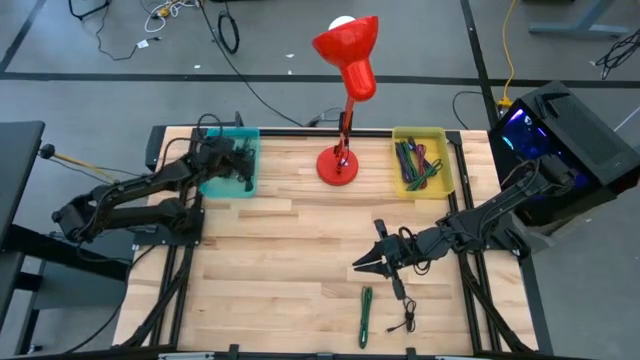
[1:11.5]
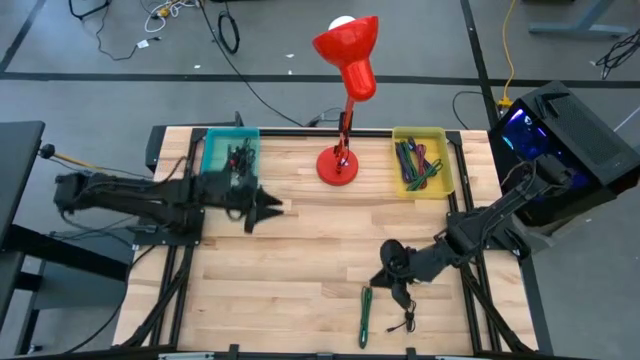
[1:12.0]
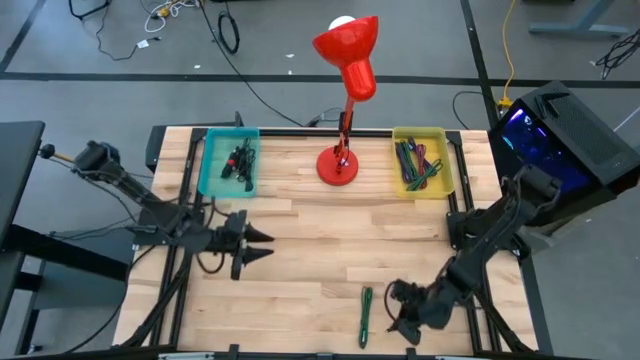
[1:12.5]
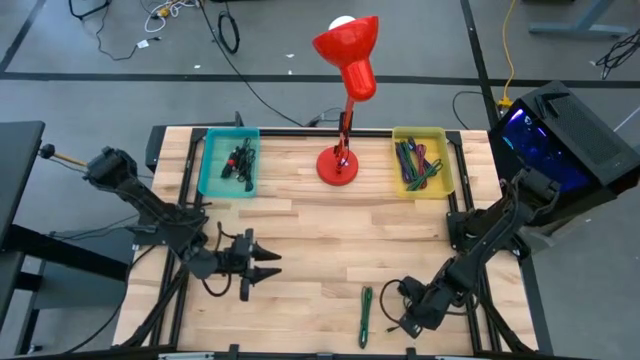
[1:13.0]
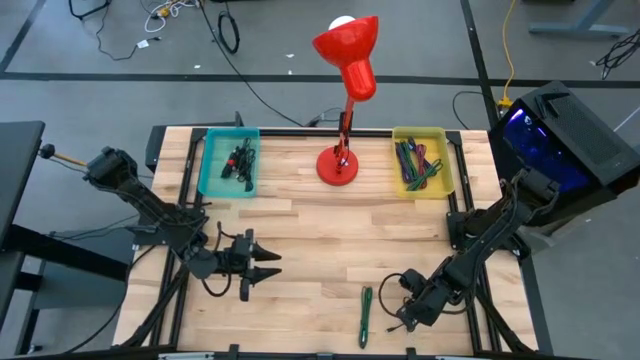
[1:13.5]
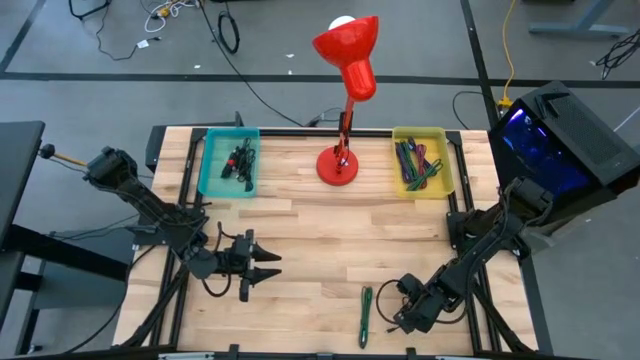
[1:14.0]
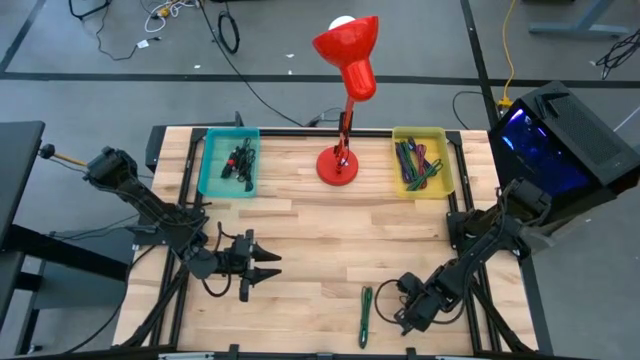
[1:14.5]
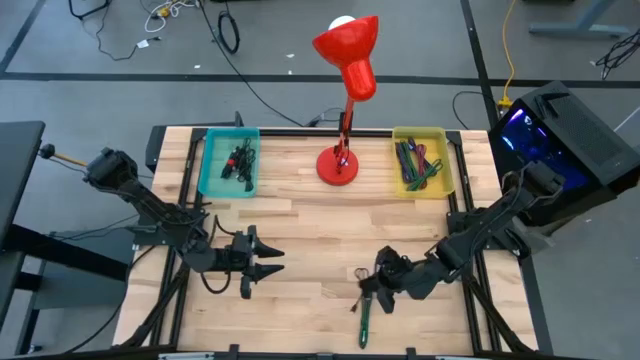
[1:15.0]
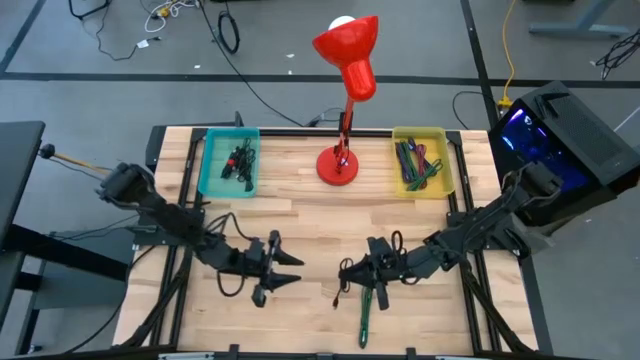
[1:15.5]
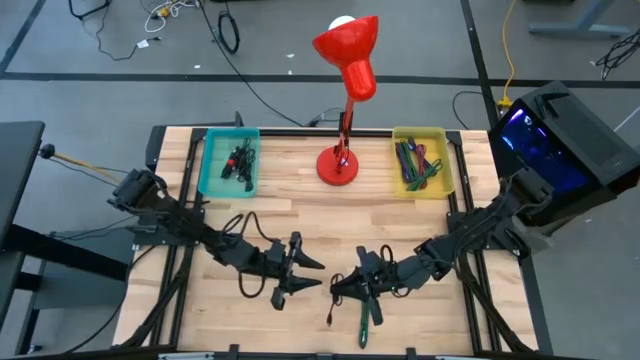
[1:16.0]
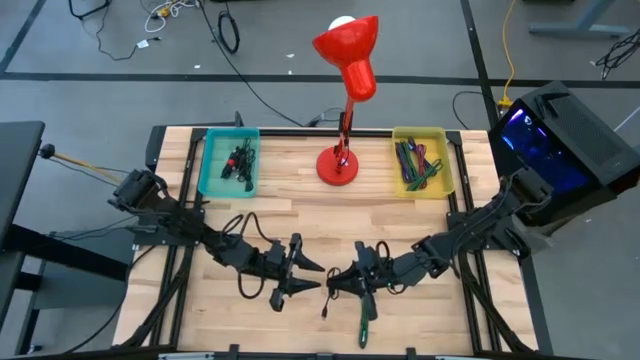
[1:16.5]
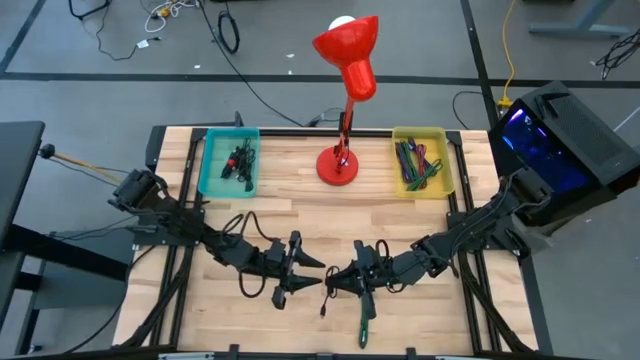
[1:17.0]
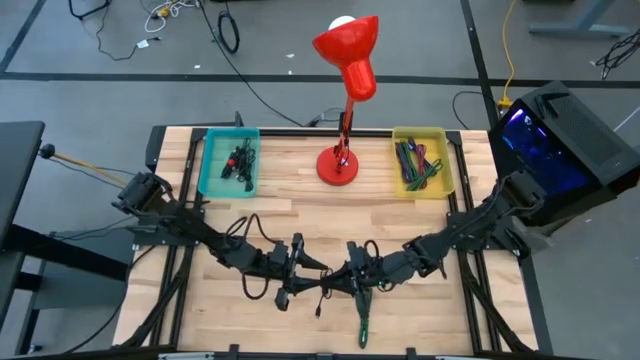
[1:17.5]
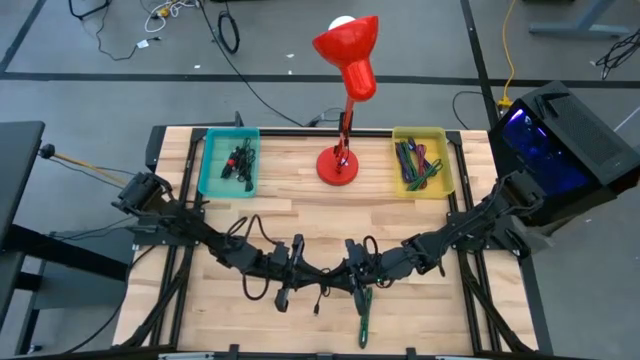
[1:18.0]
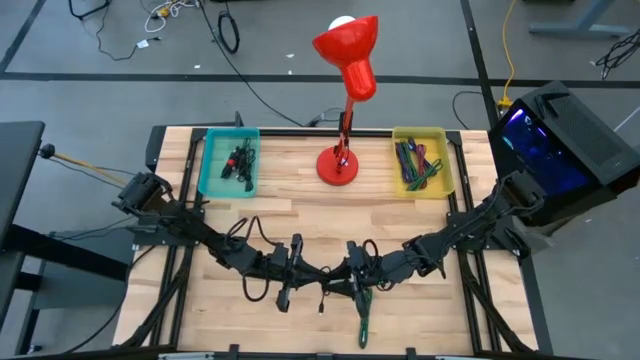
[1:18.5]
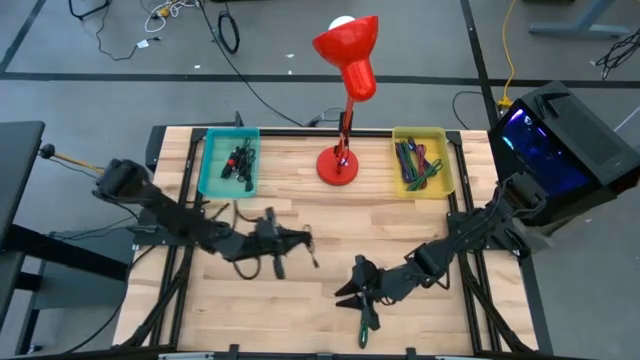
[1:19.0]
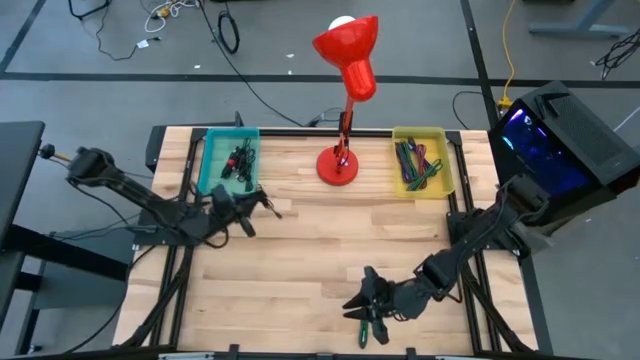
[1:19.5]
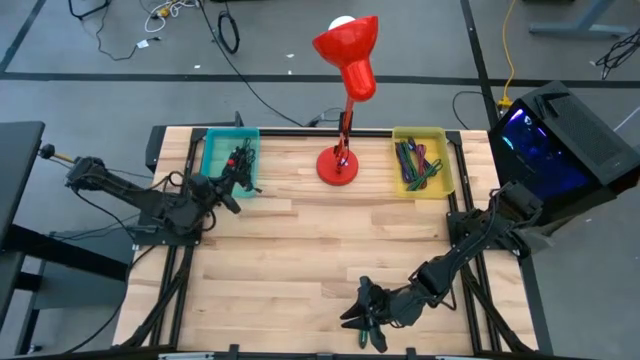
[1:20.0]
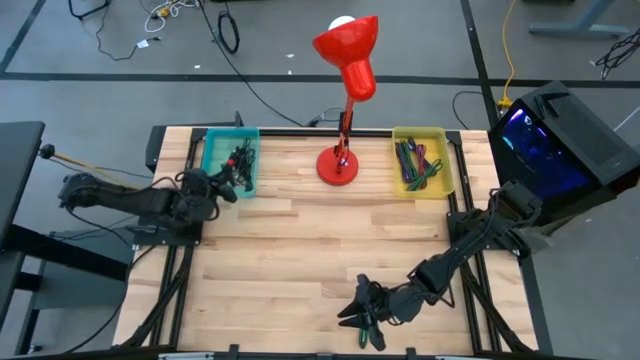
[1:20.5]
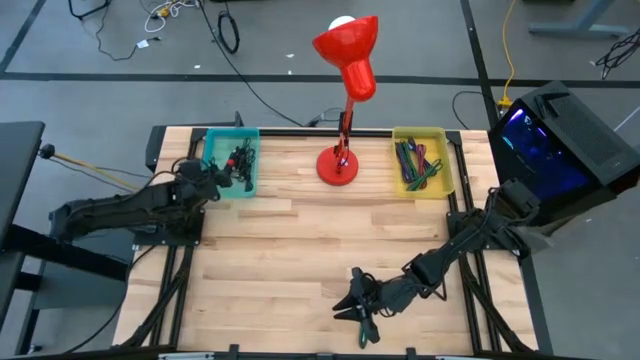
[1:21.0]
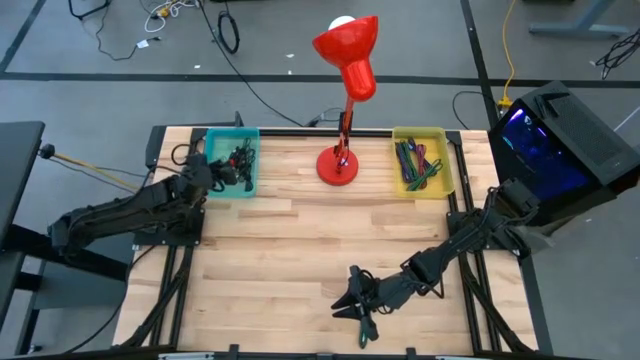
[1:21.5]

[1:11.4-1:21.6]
Task: Pick & Place USB Port
Put the black USB cable into the green bin

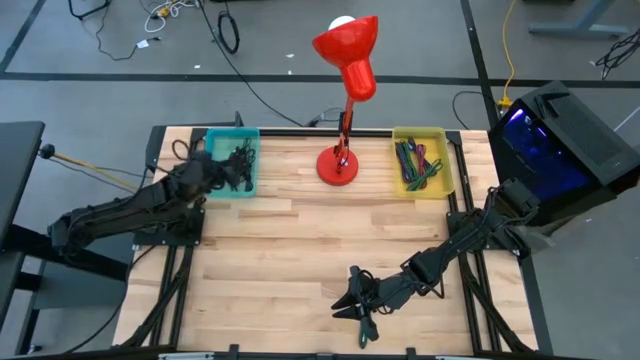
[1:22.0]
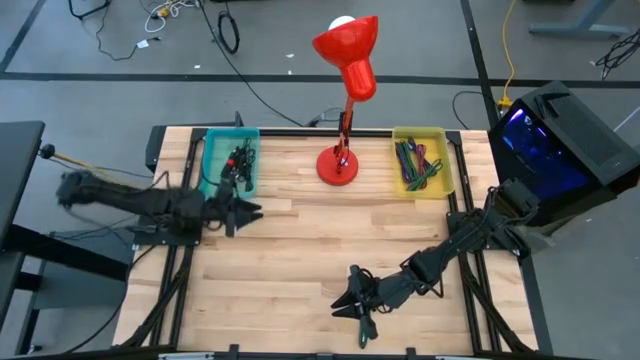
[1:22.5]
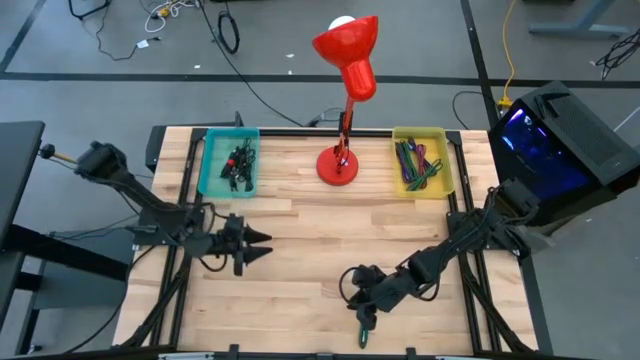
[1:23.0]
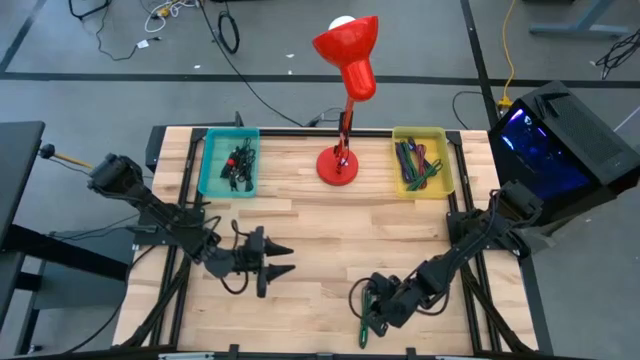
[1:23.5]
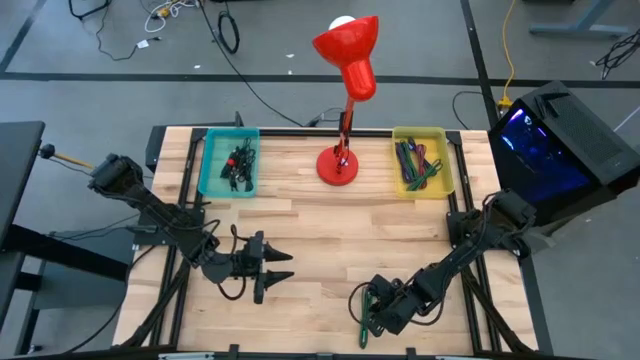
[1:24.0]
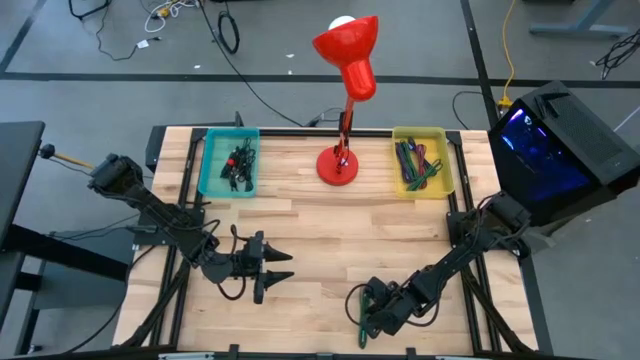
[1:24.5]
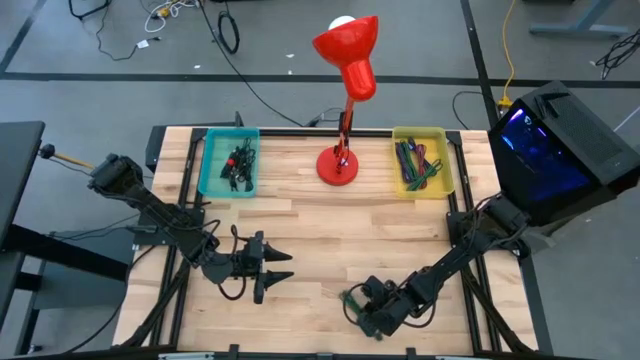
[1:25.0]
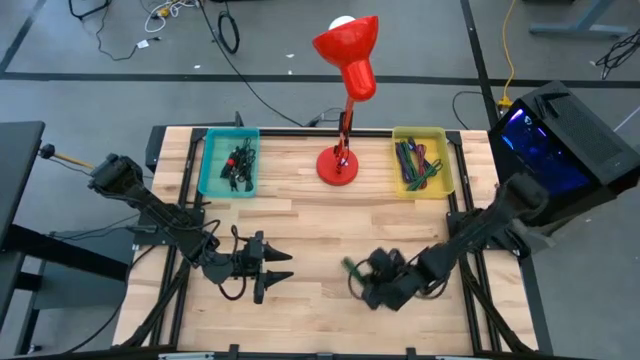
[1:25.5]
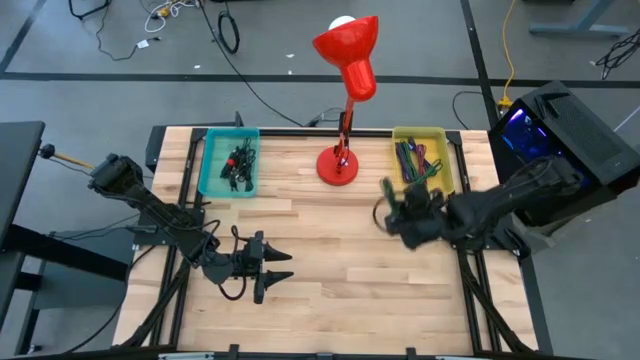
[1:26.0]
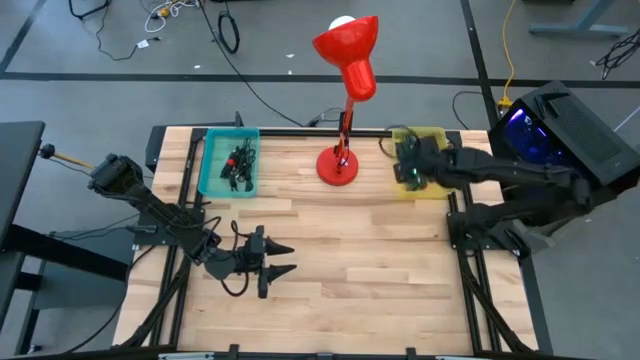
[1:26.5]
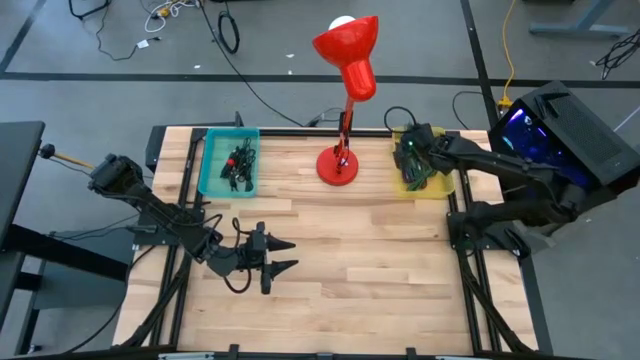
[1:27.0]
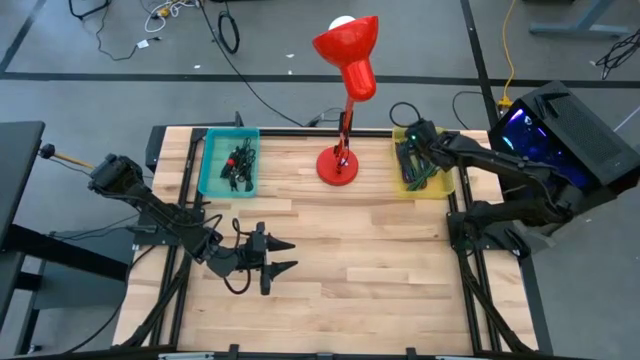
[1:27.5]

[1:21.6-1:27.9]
Put the green black USB cable into the yellow bin

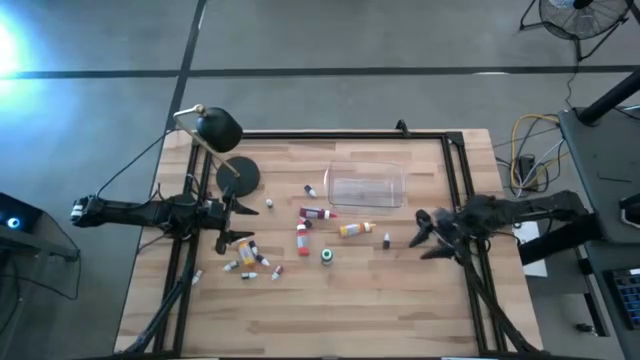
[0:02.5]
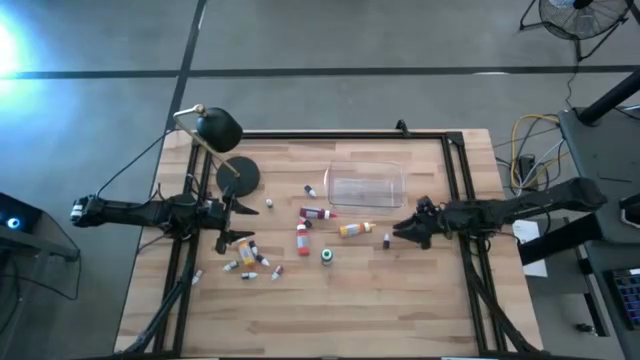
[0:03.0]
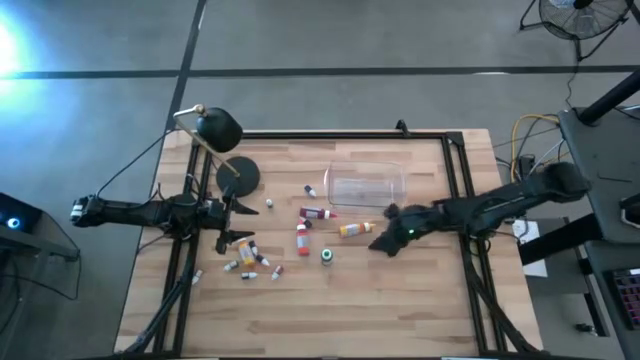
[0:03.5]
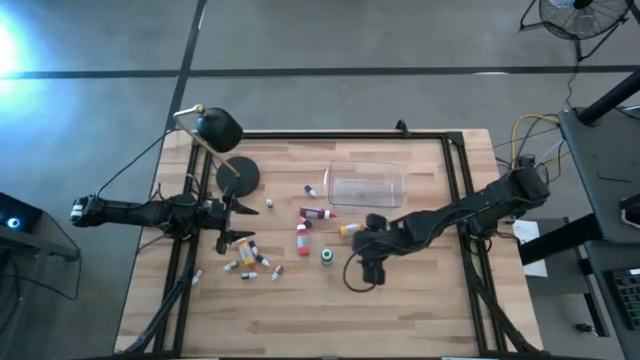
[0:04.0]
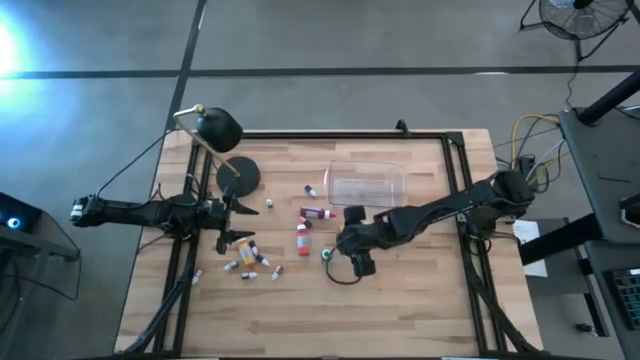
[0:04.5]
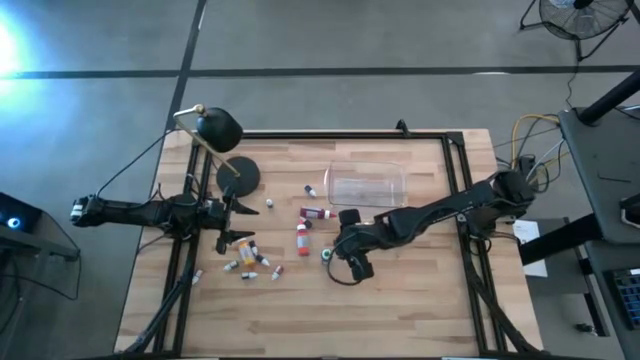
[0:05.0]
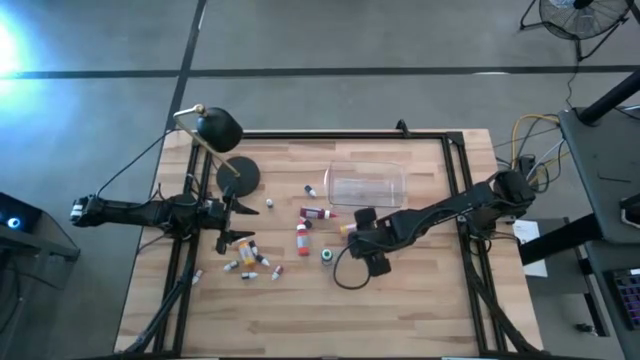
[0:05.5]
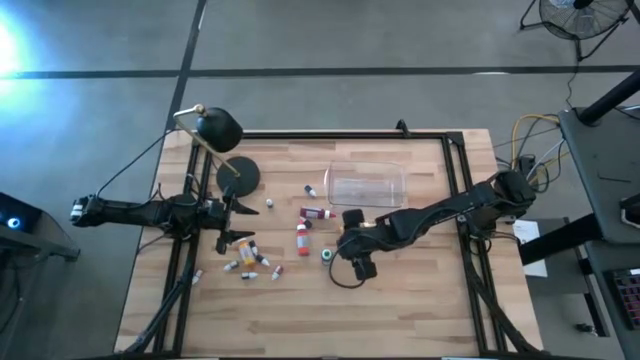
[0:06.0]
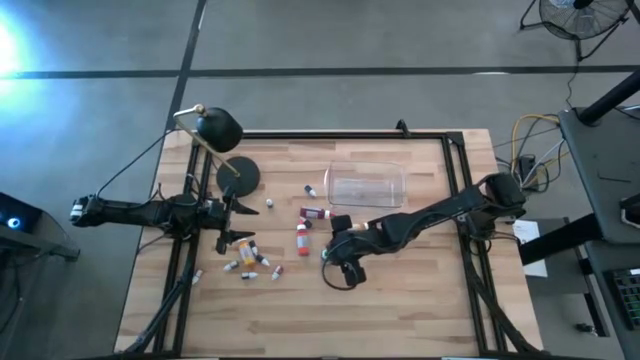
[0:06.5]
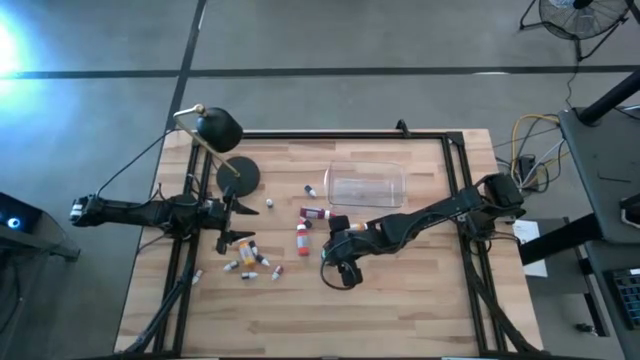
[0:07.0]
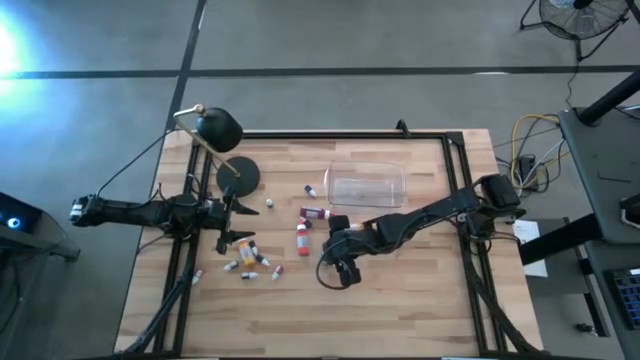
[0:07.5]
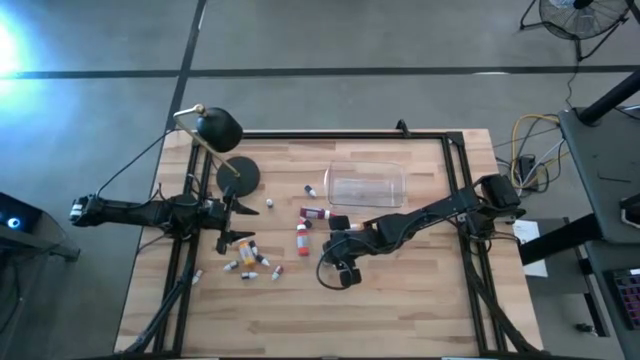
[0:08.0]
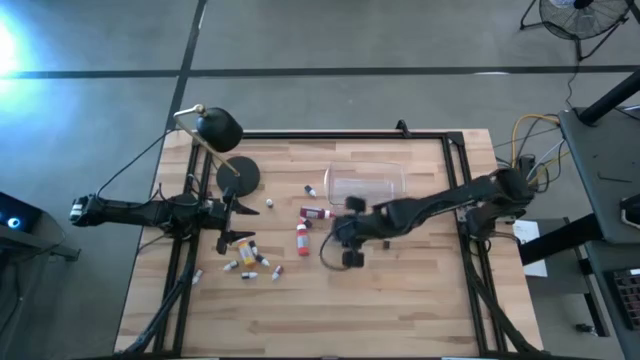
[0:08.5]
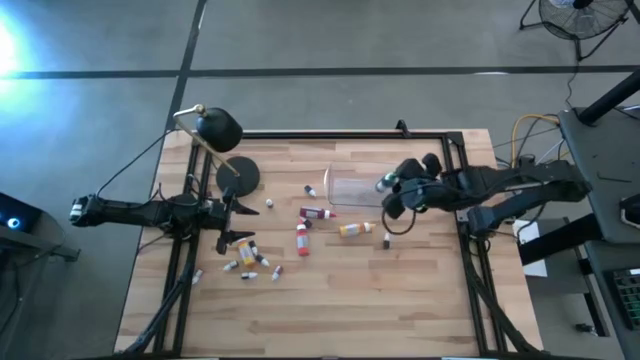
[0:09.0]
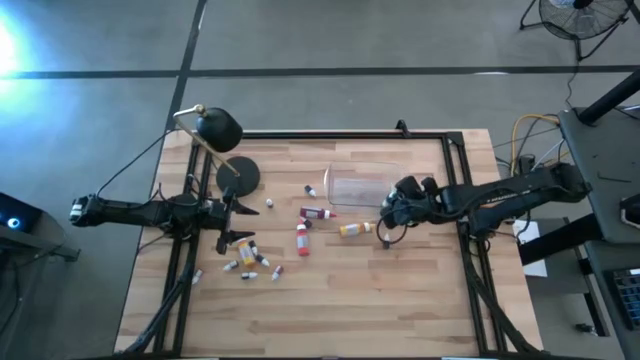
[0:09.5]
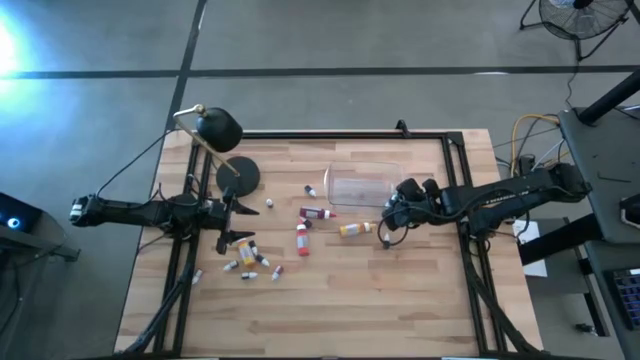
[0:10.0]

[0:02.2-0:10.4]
Task: Pick & Place food coloring
Put the large green food coloring bottle into the transparent bin
